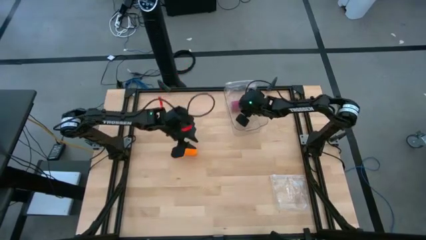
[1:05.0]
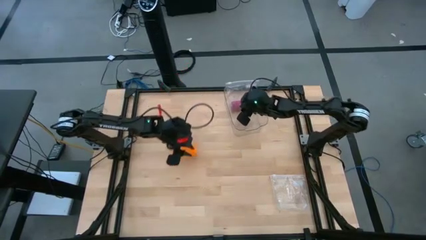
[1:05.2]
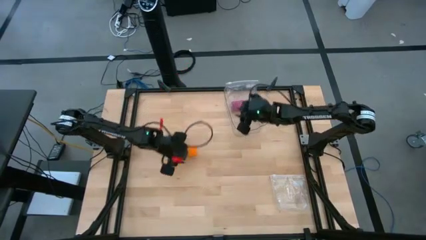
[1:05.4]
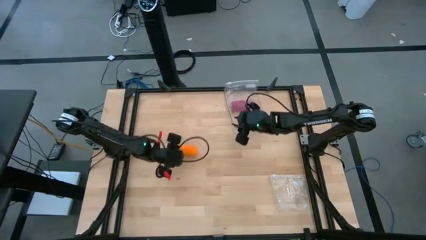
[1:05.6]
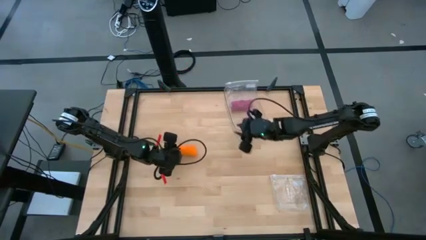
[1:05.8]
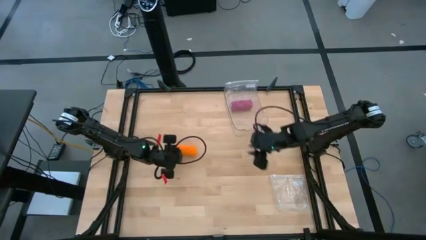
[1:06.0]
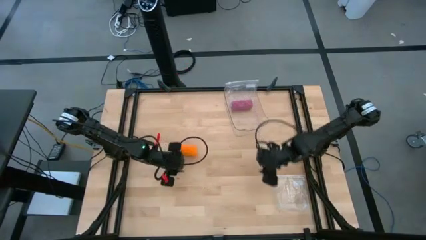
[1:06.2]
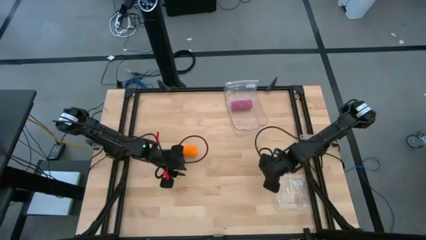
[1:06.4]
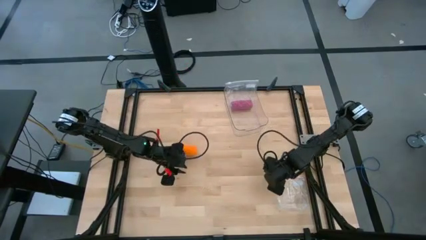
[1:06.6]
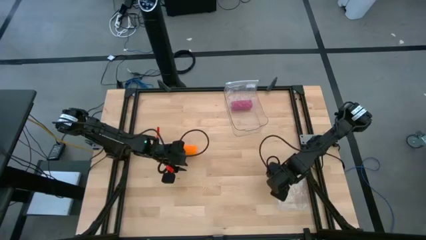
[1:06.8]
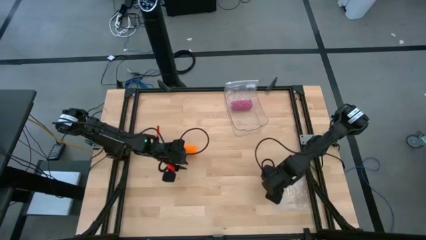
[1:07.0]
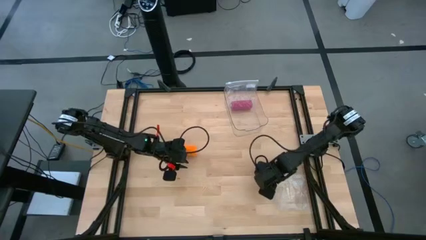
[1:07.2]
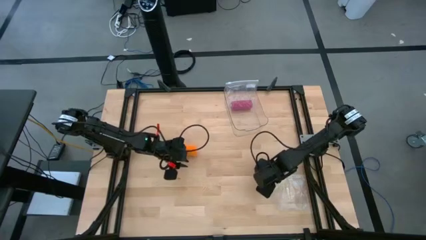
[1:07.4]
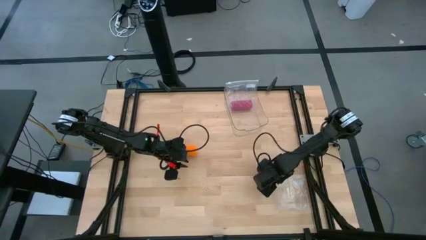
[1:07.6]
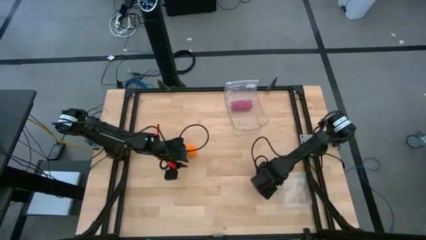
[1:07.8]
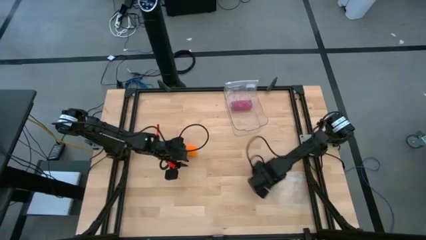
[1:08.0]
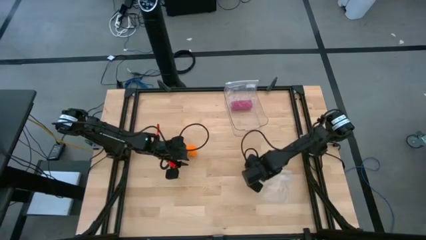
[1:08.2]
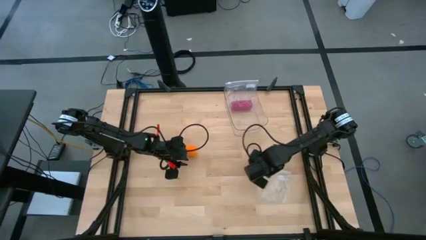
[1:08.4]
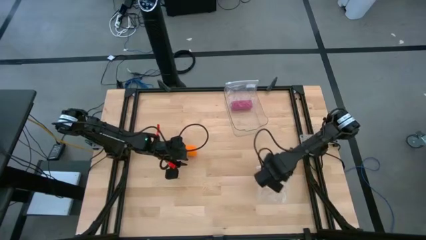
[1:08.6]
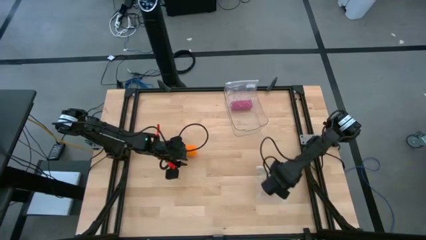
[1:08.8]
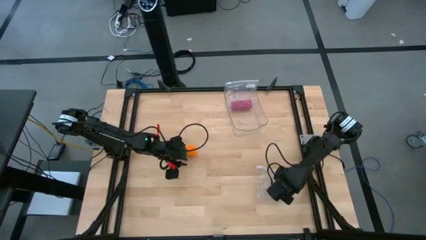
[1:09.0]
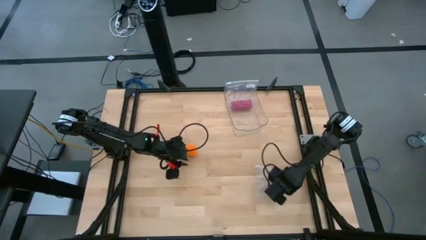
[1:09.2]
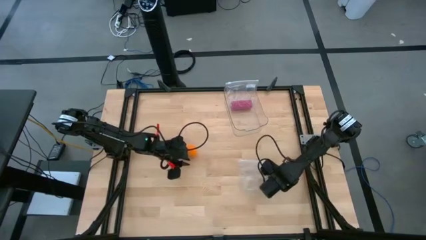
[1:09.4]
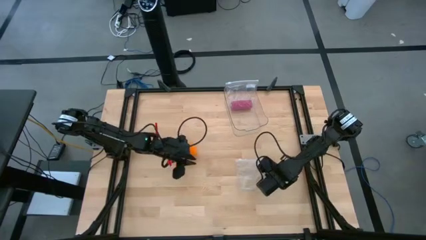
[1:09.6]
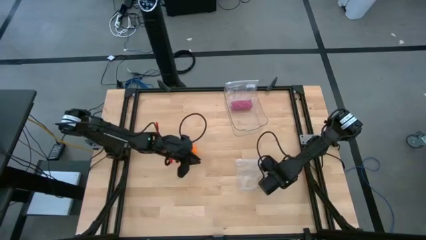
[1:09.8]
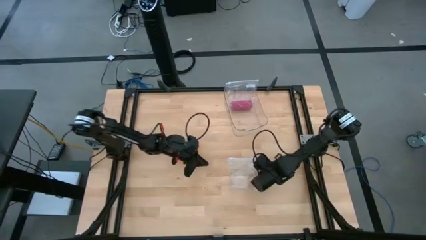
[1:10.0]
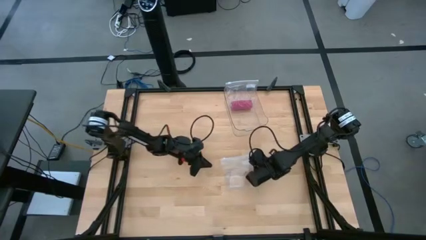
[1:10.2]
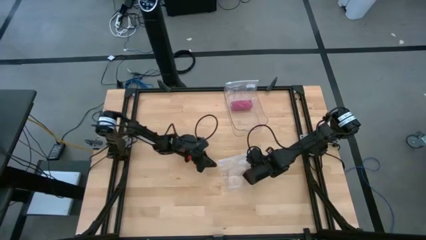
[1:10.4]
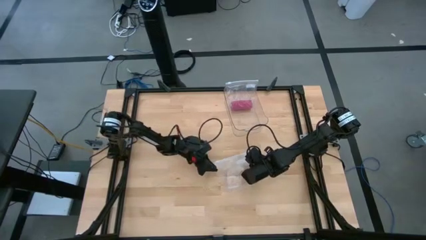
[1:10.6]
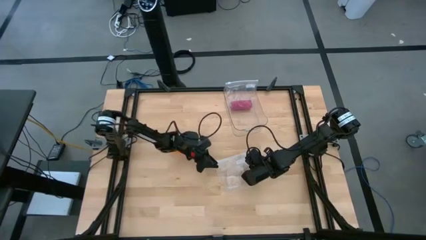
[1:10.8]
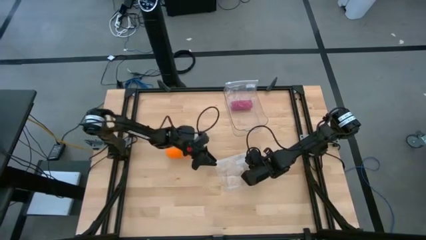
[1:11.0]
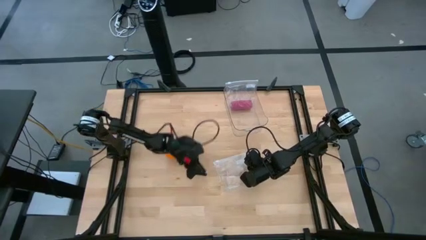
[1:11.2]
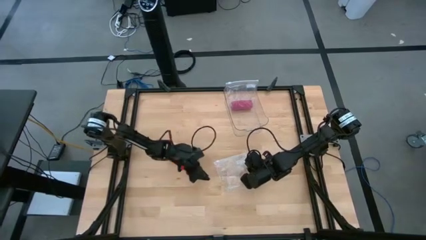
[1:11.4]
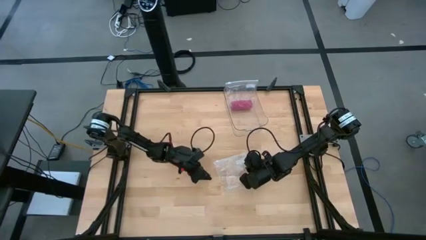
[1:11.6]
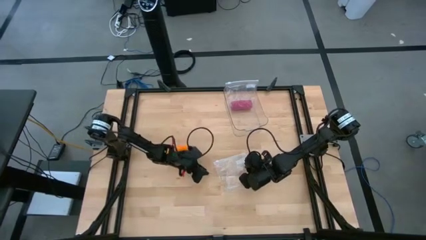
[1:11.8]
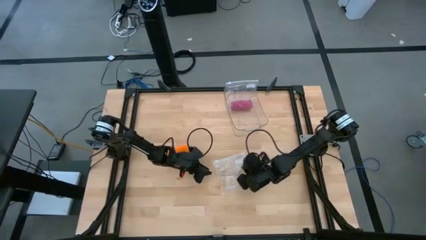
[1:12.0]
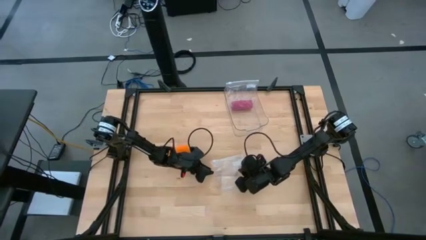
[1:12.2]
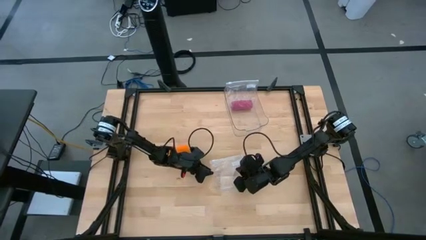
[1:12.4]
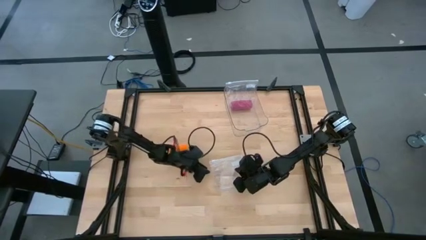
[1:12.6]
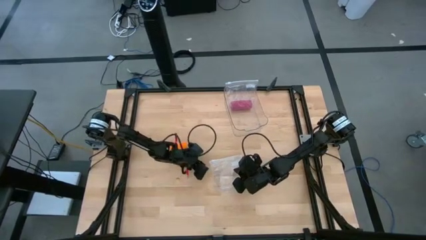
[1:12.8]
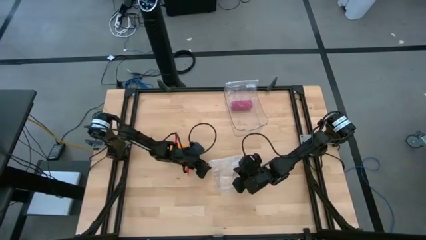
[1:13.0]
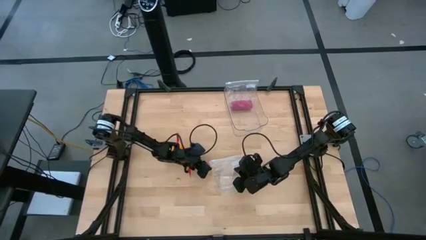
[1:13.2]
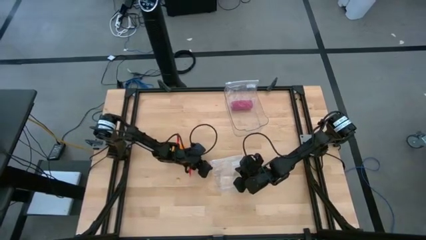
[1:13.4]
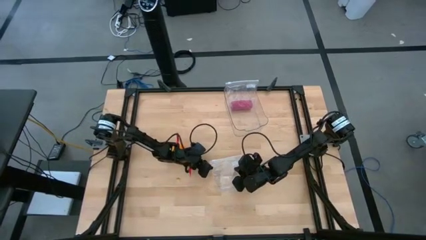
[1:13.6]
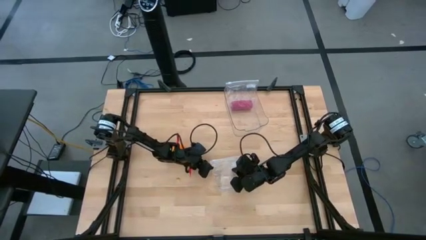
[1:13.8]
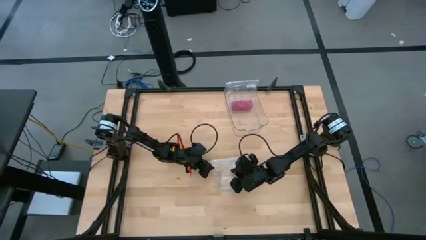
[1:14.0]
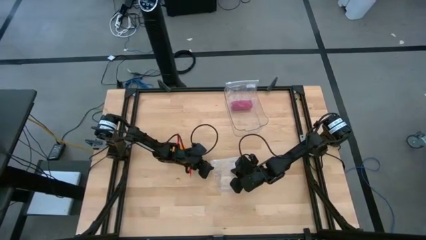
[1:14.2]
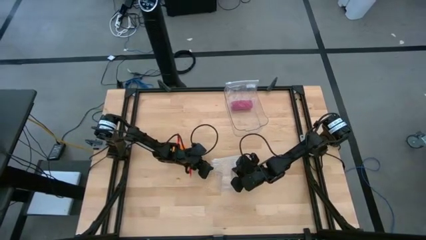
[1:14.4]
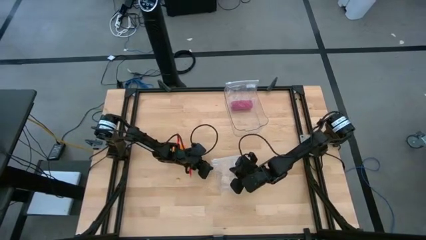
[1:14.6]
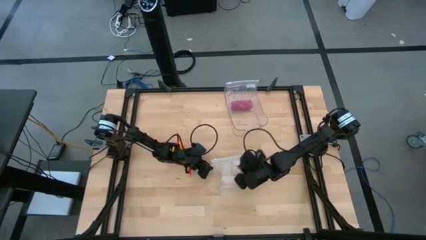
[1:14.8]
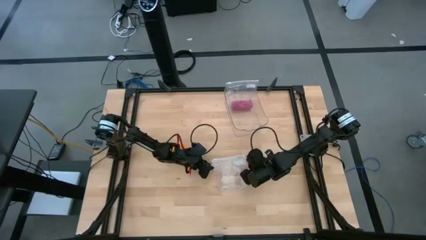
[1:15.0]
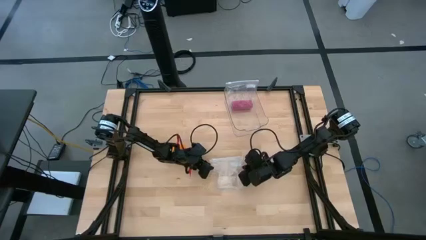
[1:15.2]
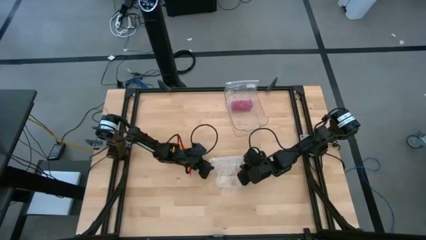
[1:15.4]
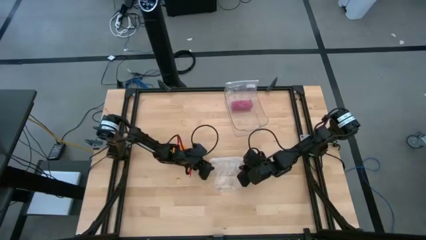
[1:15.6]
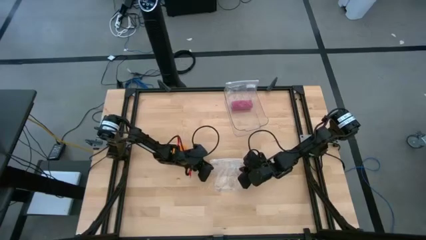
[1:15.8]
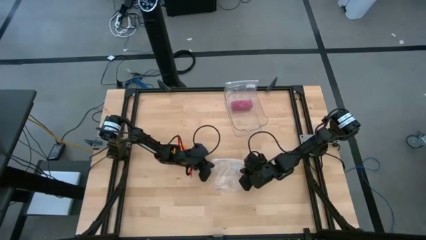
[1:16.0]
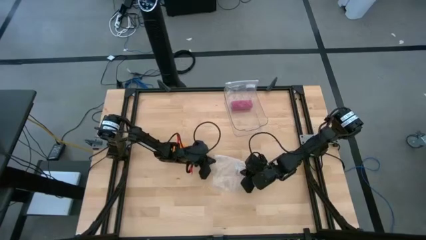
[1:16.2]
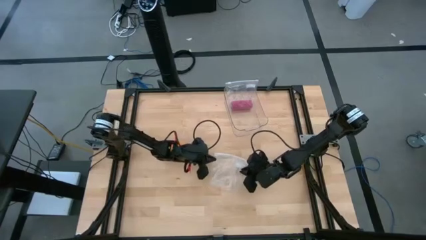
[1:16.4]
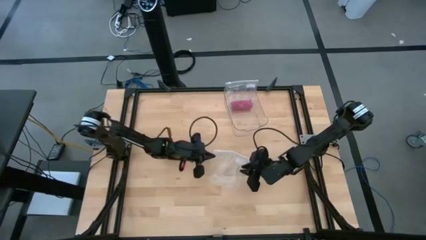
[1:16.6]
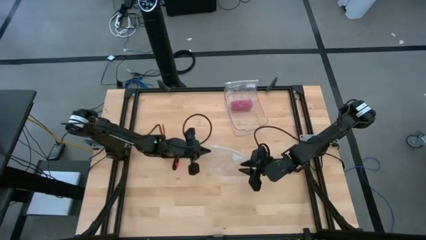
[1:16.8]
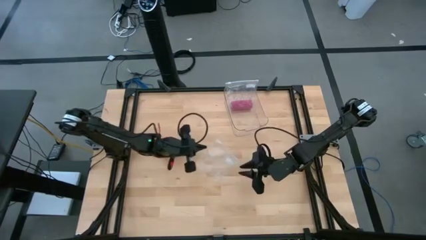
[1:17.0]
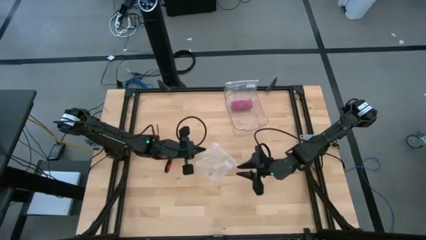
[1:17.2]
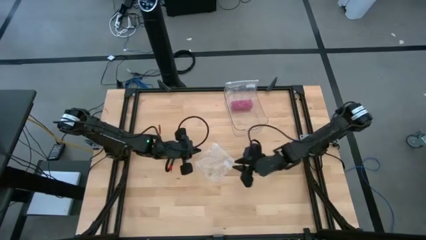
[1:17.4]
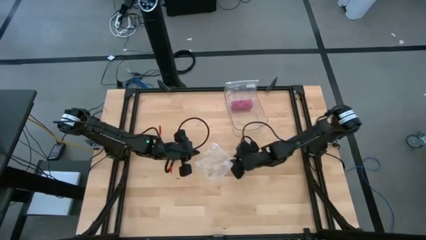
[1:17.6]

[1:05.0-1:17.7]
Task: Roll bandage
Open the transparent zip bag
